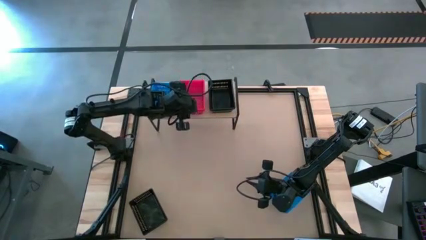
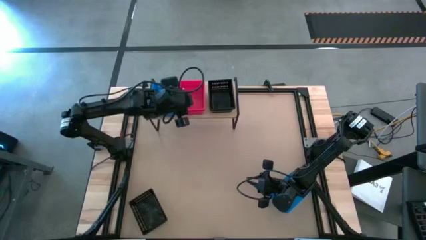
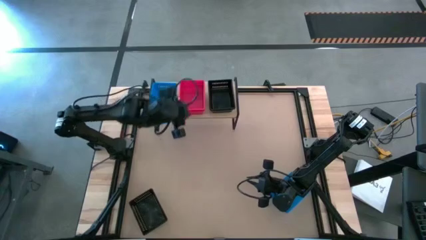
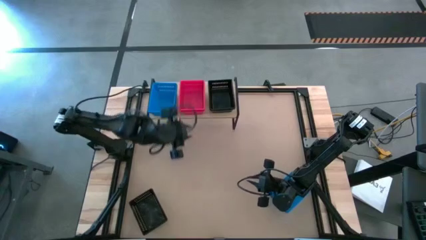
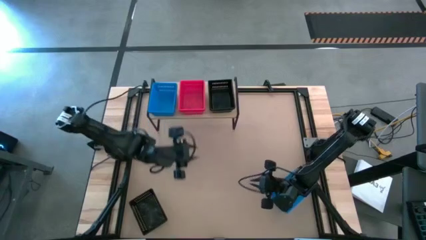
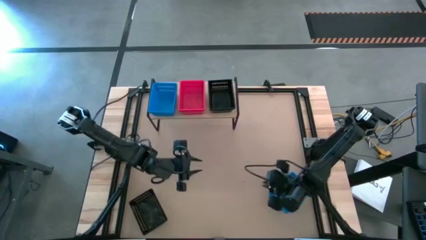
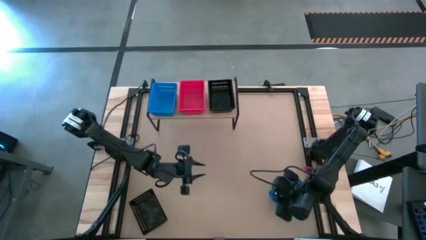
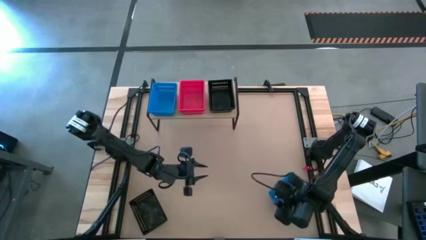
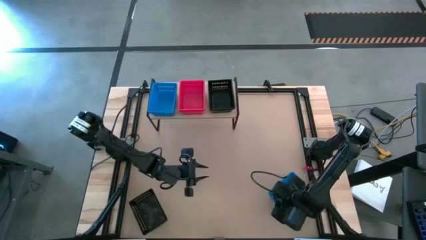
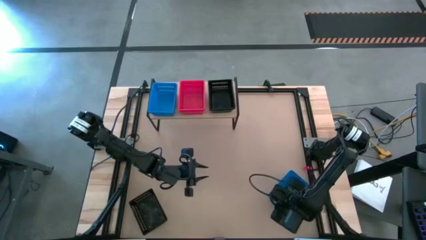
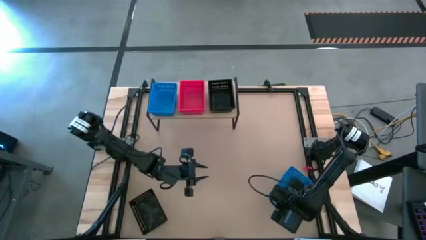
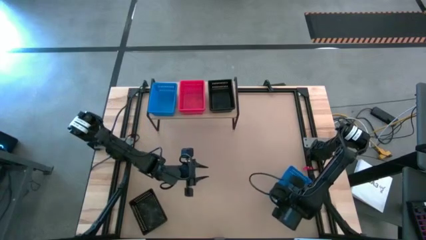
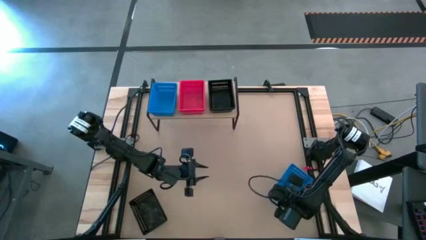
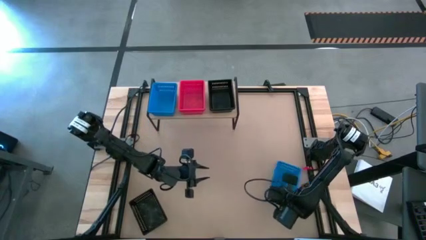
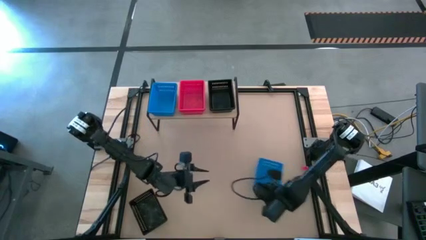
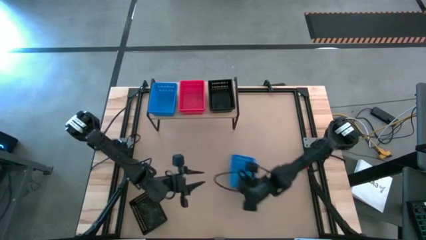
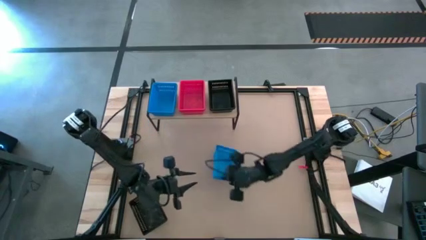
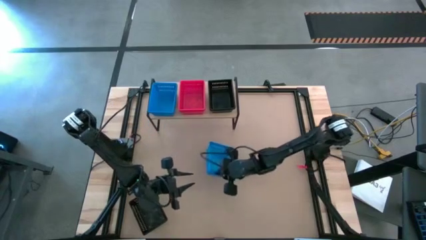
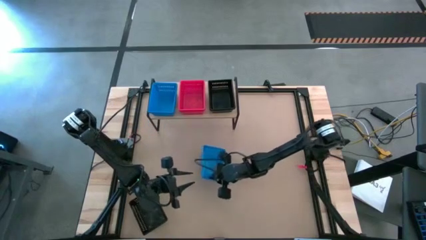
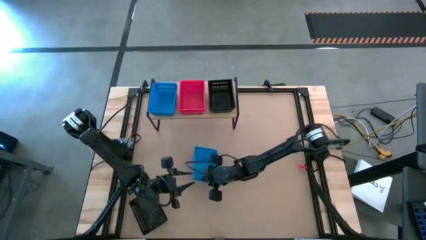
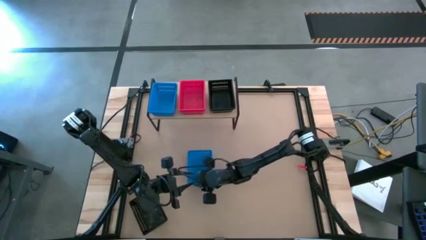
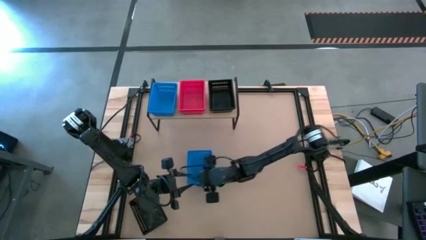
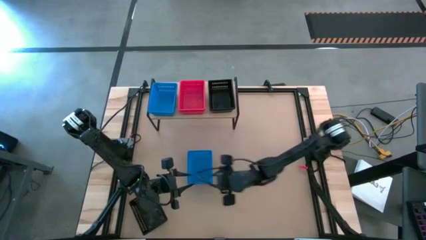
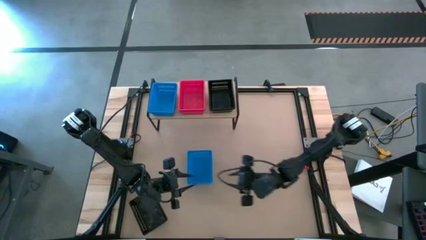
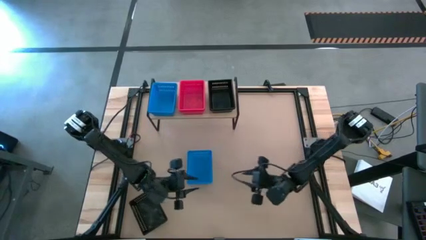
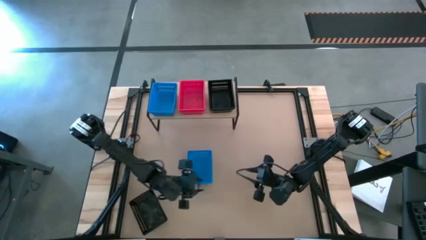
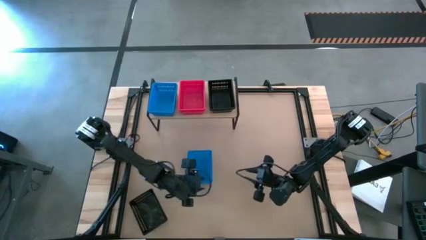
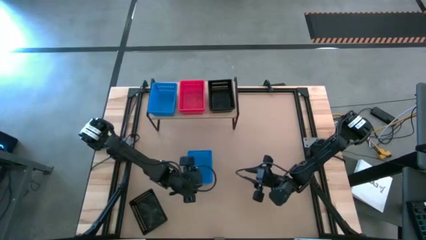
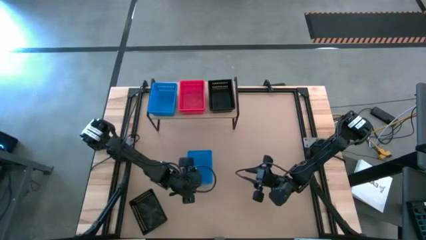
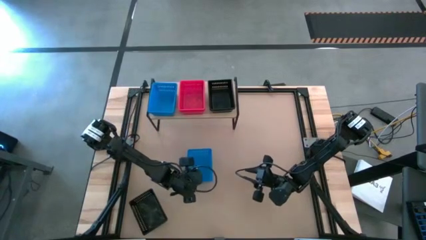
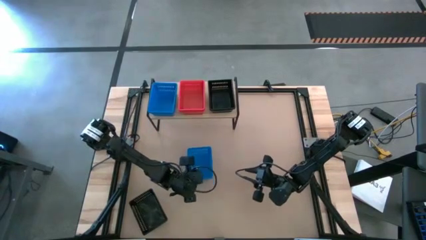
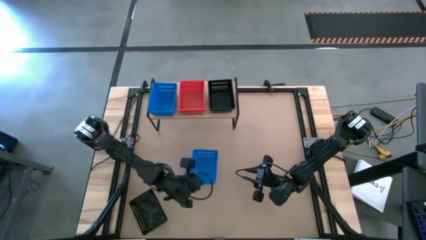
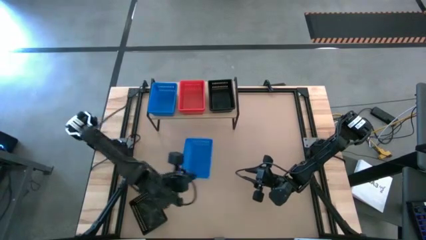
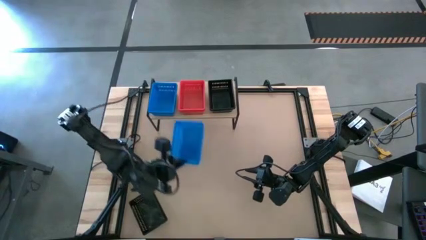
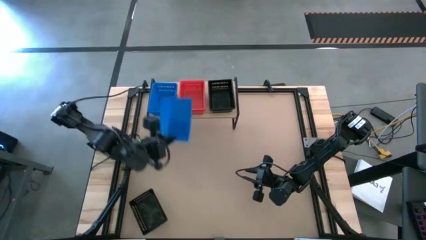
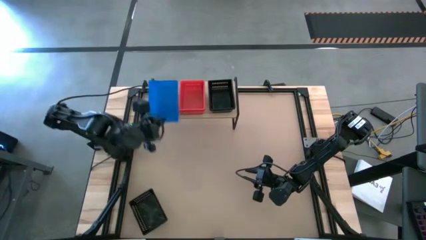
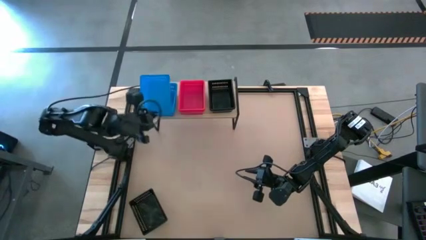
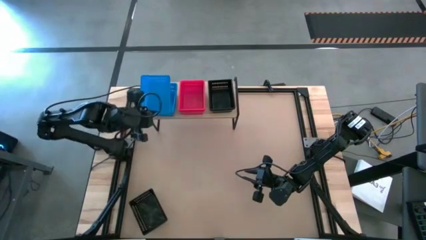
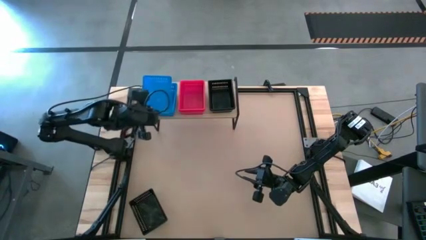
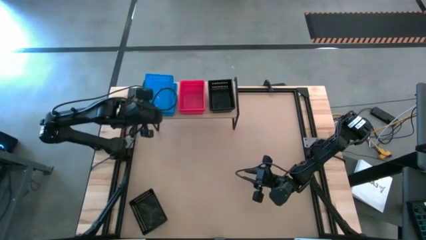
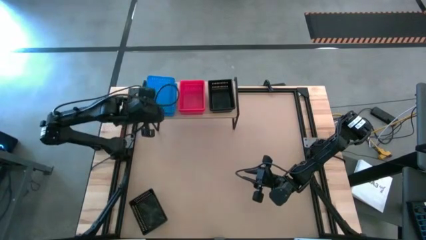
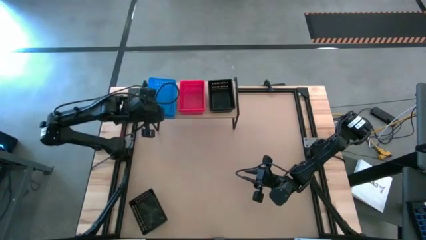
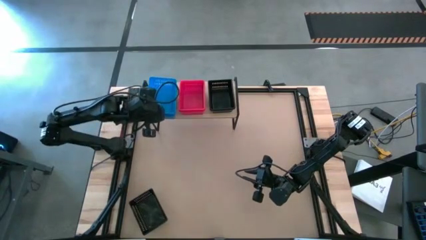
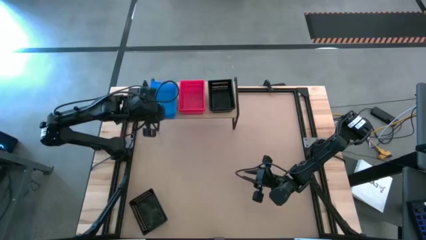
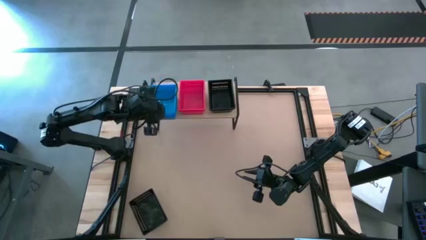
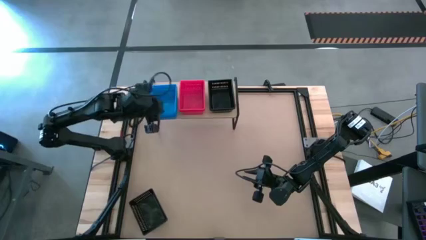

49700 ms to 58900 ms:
Task: Stack baskets on shelf by color
Stack the blue bin on the blue bin on the shelf

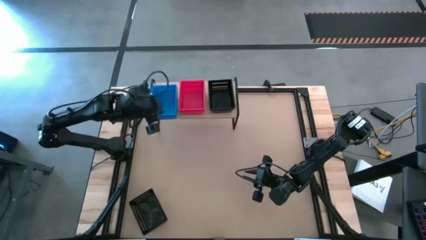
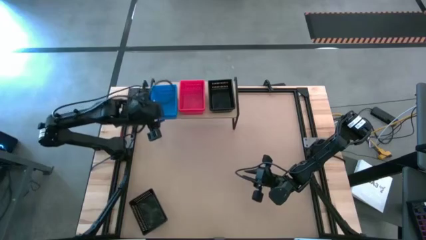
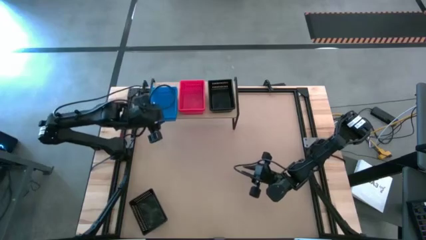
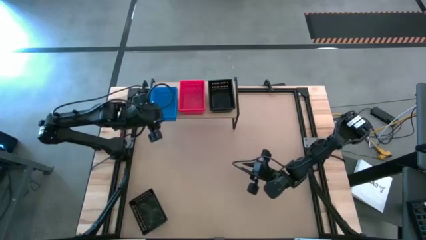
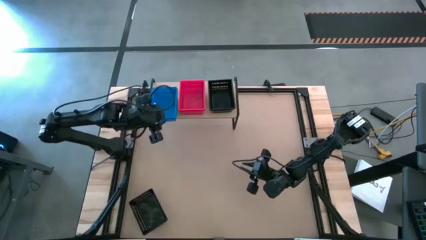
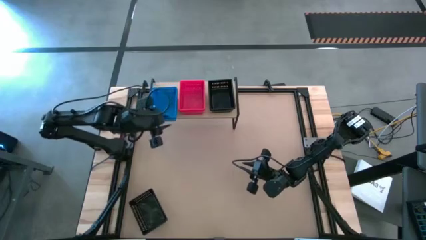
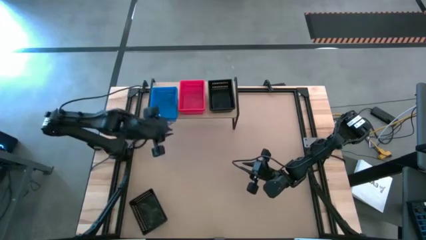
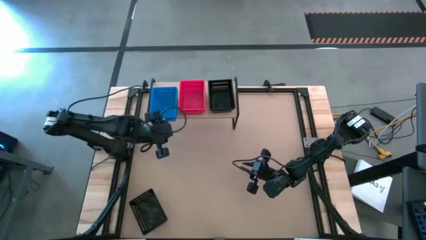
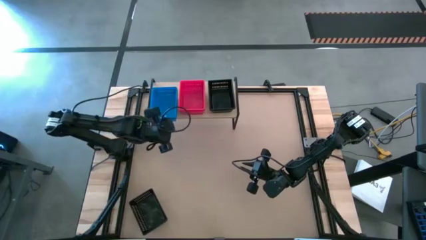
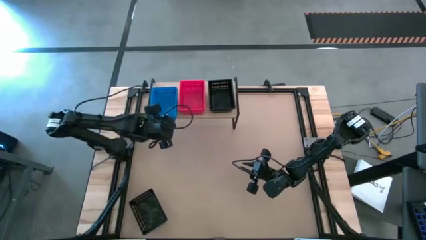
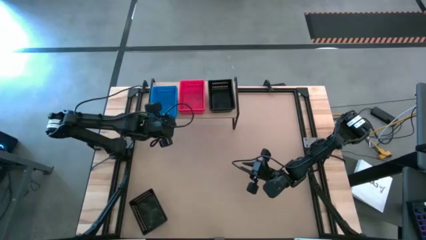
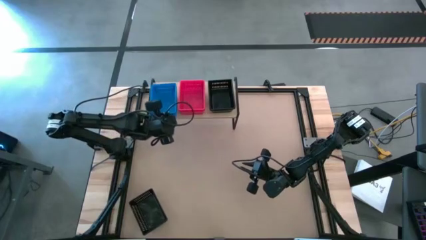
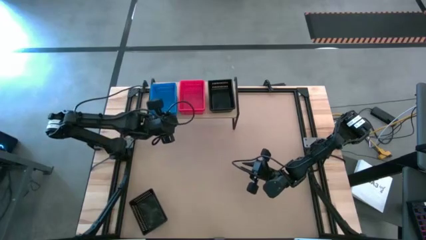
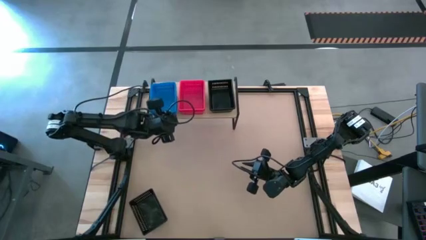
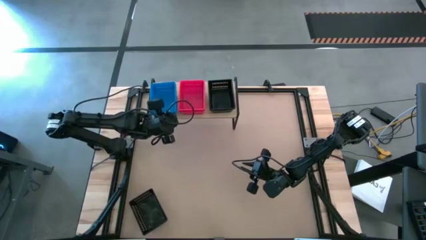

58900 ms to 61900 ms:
Adjust the blue bin on the shelf

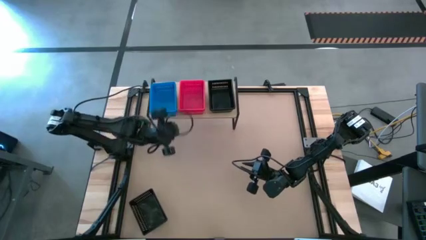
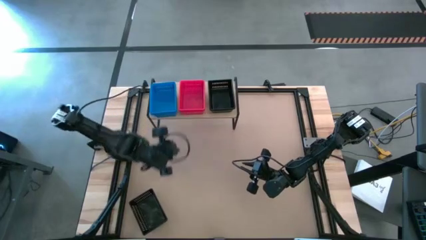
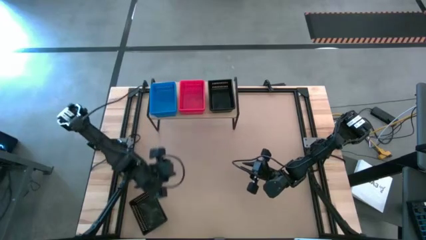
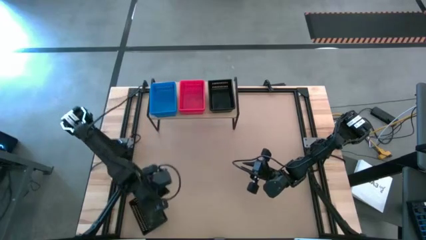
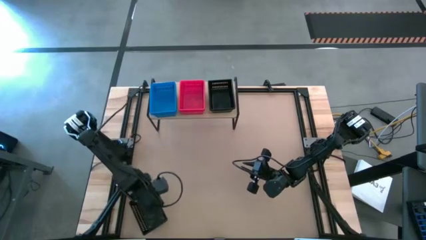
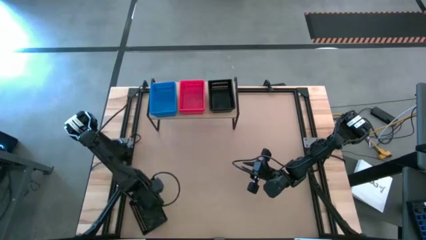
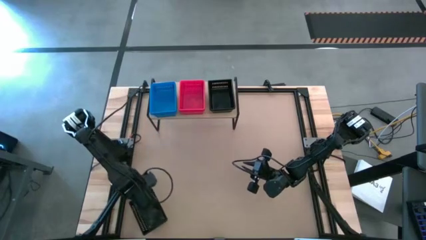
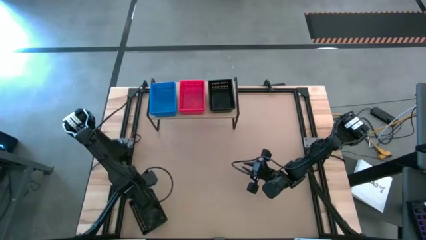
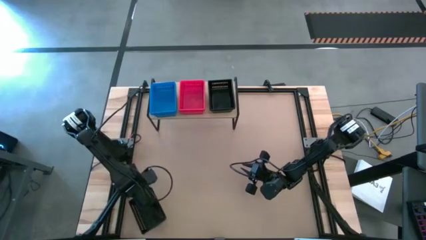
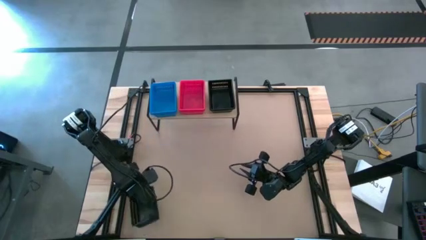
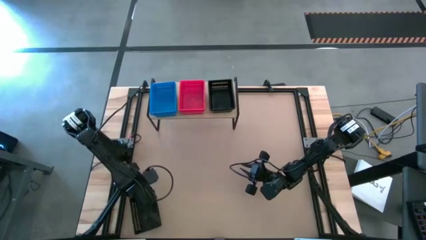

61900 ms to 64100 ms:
Stack the black bin on the black bin on the shelf
